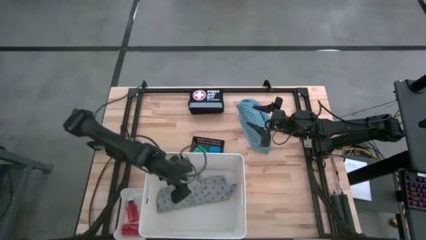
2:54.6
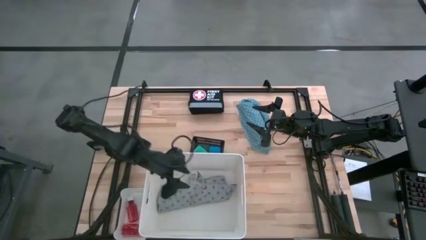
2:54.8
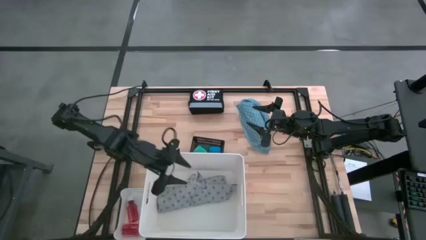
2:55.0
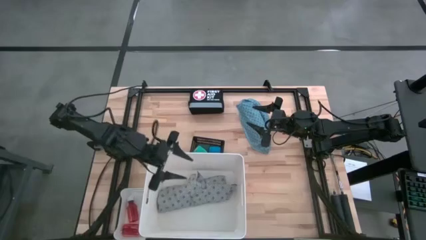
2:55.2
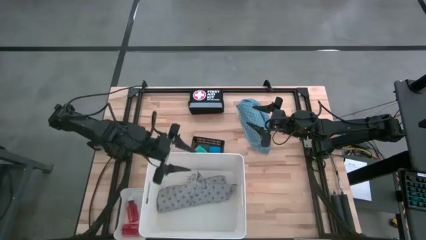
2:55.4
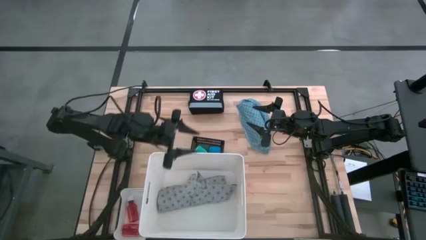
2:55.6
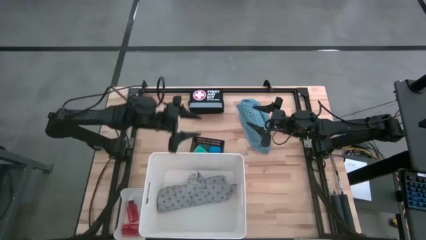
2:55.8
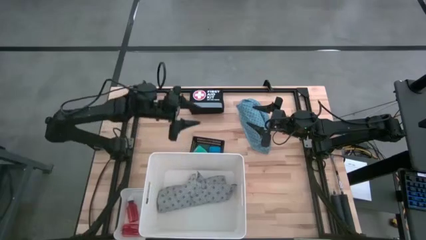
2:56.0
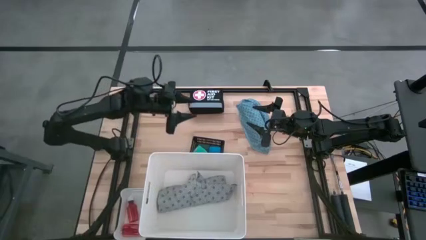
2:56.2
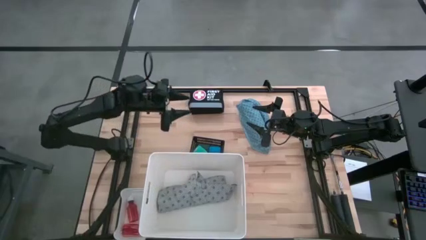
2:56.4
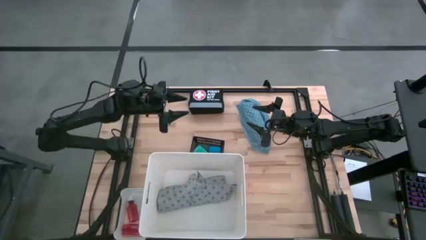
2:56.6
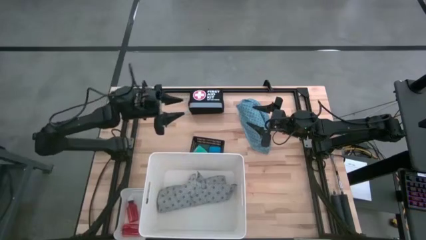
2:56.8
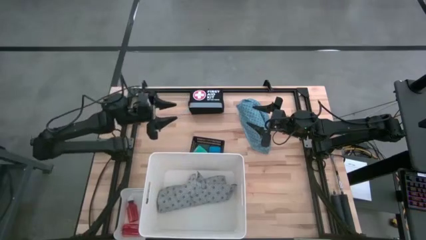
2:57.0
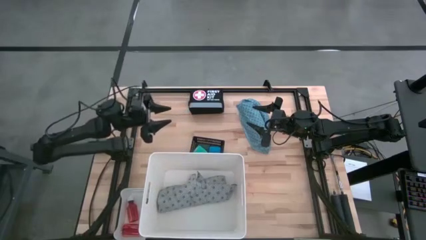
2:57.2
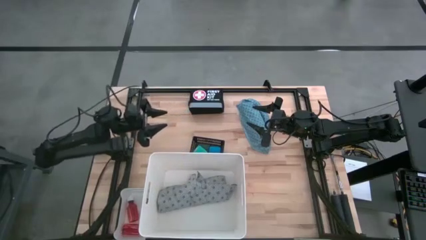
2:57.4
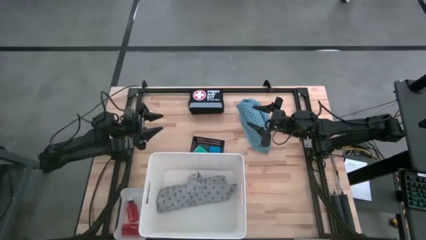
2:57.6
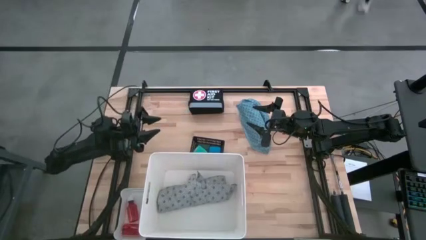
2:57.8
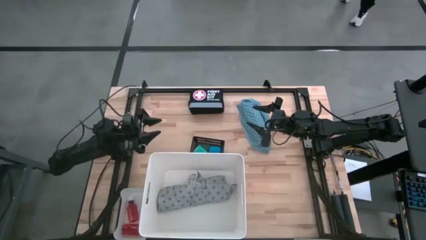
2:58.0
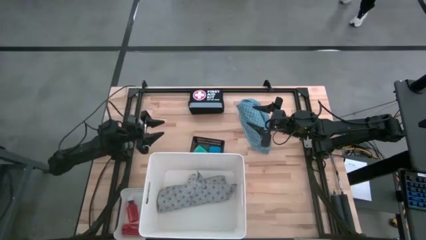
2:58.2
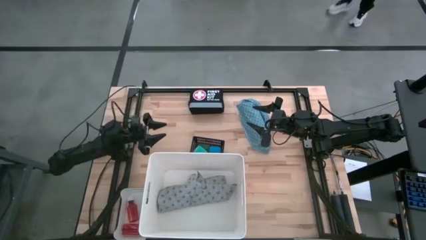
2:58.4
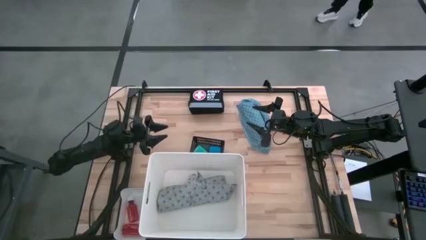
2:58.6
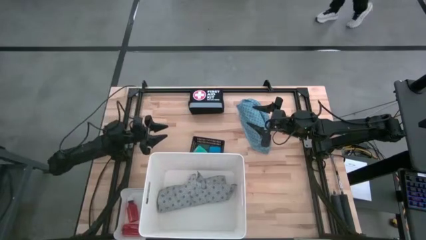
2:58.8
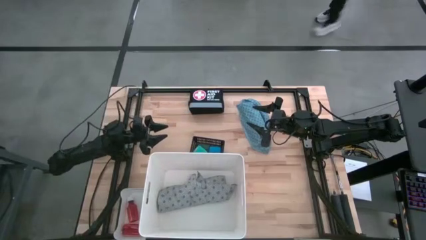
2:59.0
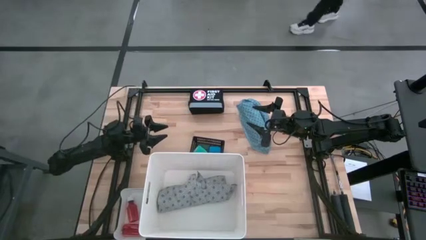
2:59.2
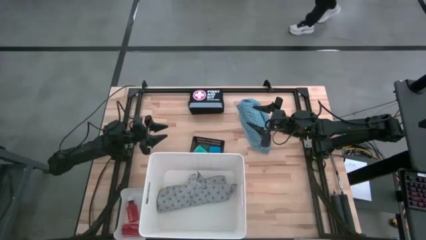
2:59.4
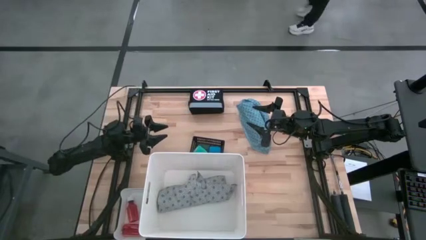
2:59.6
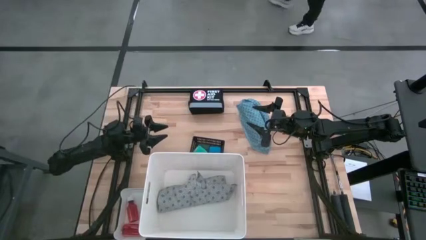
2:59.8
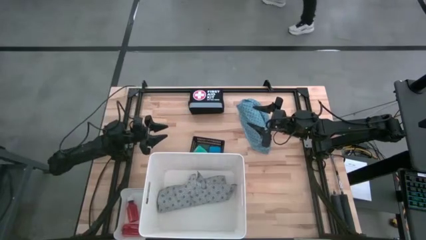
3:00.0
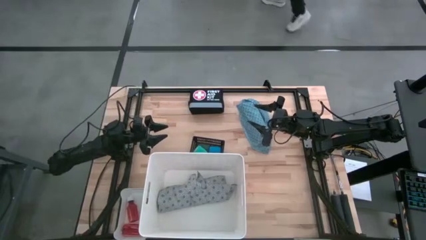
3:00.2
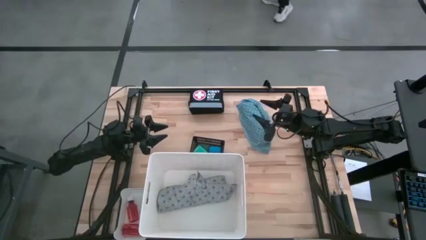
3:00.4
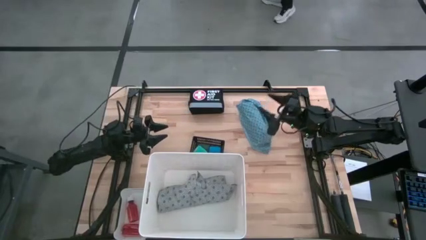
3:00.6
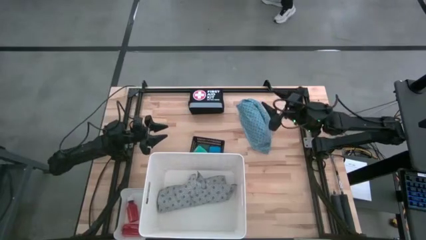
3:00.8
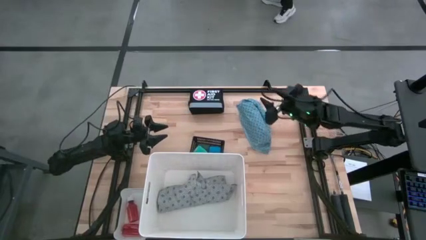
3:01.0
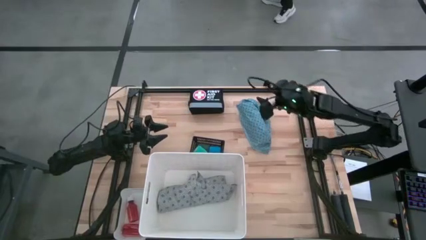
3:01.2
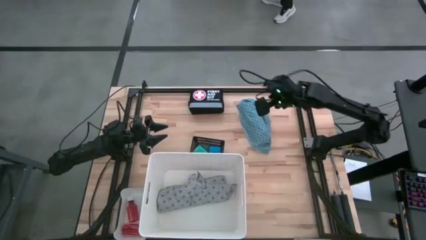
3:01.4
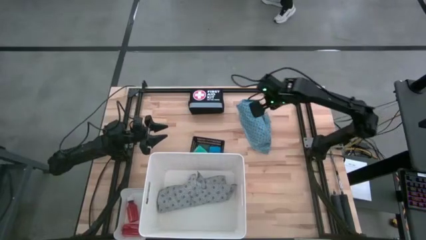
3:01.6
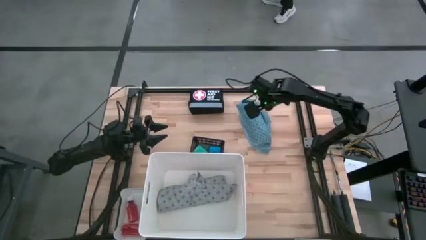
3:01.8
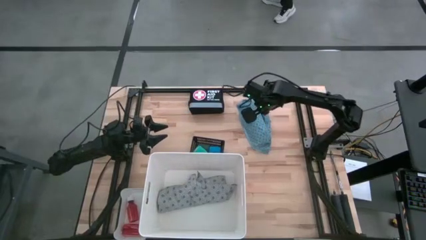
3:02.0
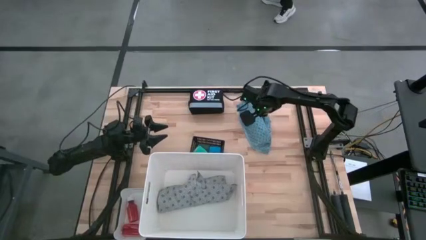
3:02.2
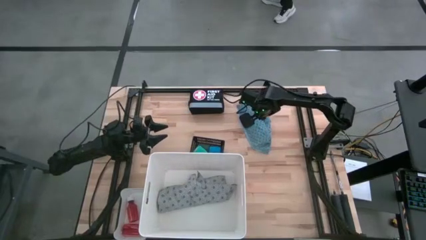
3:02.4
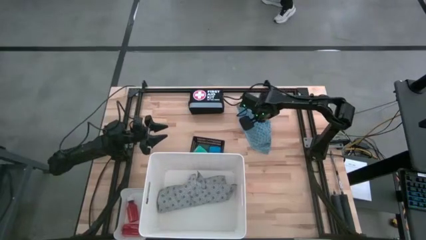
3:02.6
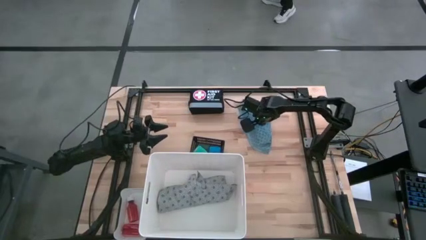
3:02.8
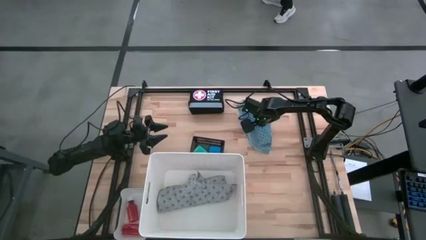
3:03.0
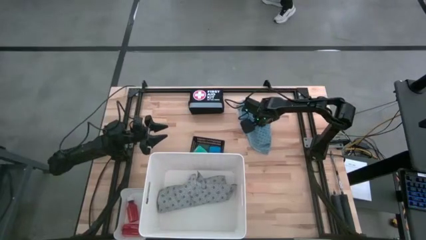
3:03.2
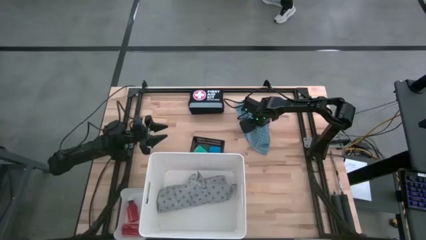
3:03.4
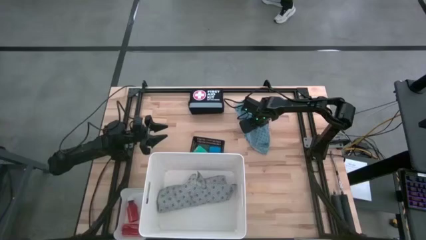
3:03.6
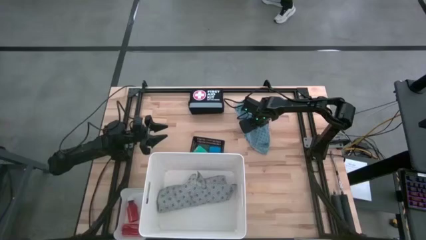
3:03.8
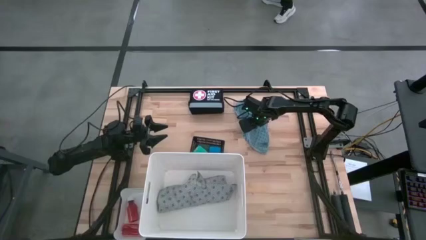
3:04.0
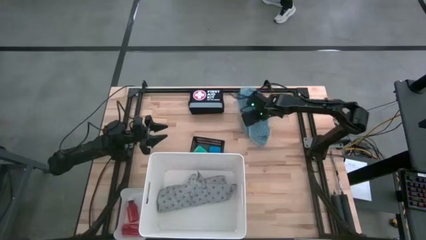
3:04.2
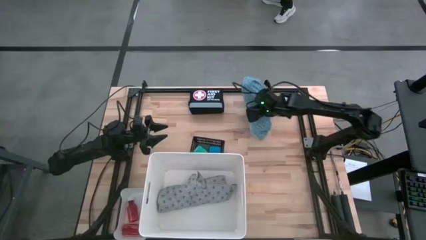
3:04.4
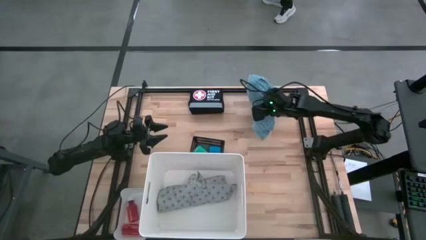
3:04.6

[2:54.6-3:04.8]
Task: Pick & Place Medicine items
Put the blue patient gown into the large white bin

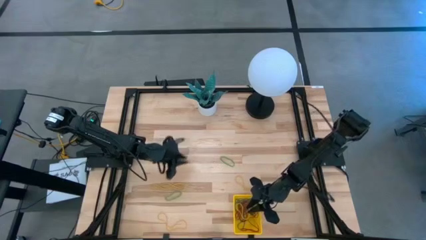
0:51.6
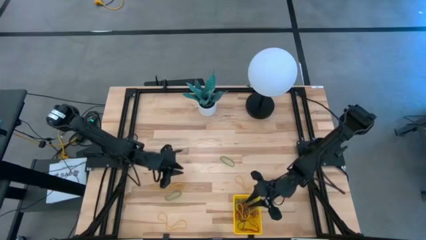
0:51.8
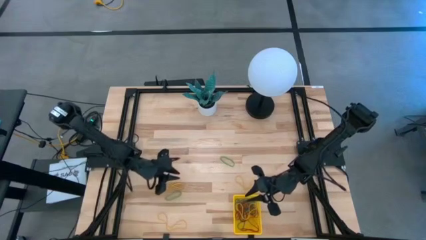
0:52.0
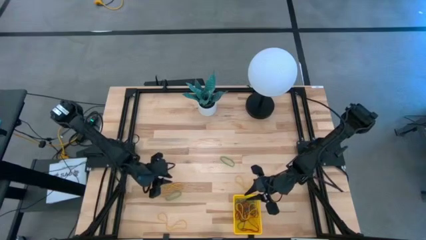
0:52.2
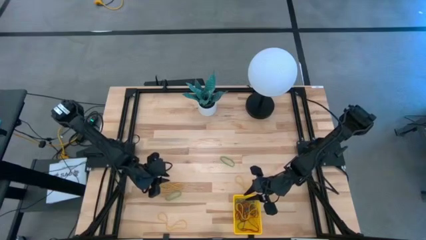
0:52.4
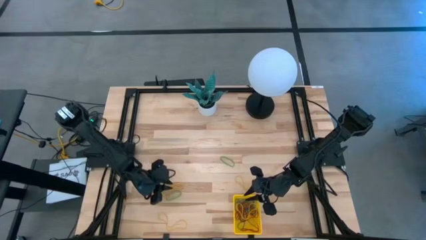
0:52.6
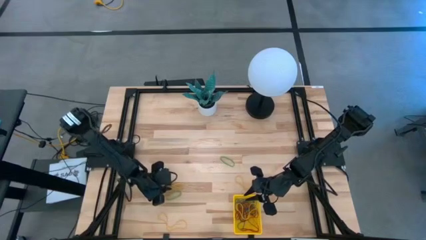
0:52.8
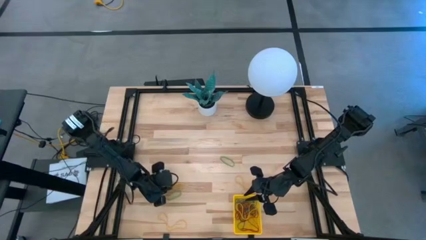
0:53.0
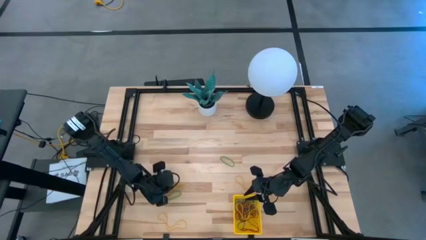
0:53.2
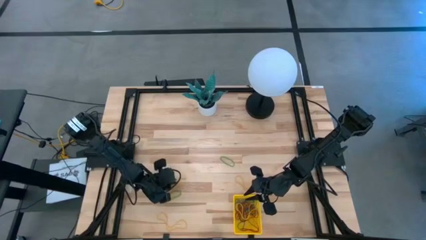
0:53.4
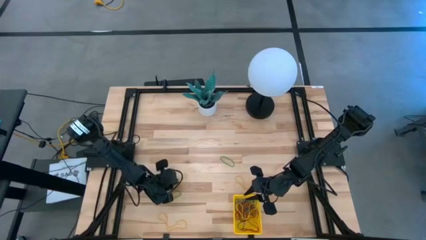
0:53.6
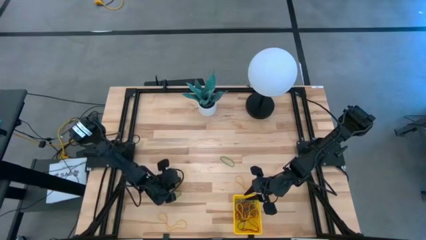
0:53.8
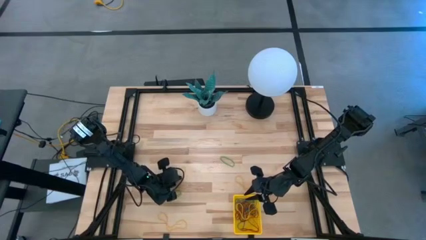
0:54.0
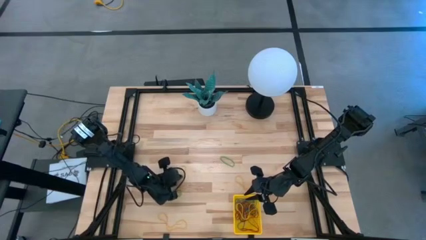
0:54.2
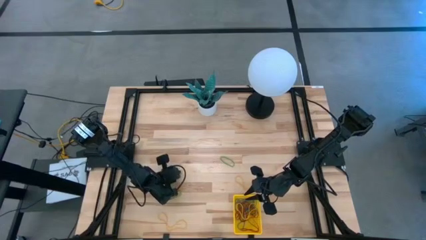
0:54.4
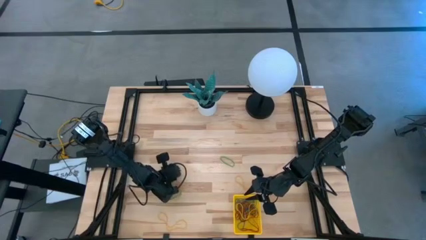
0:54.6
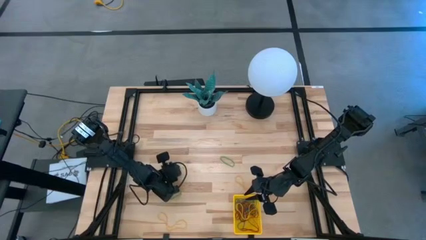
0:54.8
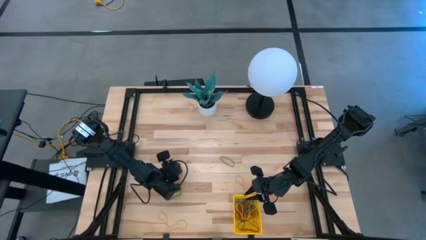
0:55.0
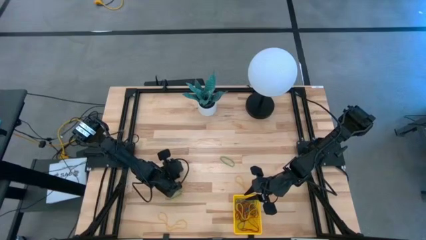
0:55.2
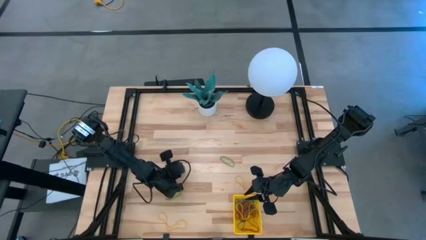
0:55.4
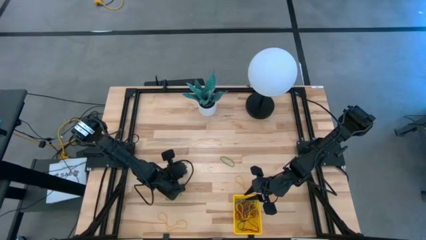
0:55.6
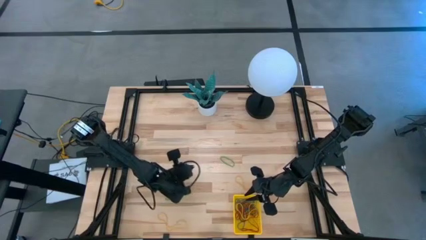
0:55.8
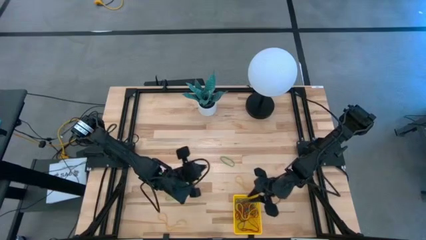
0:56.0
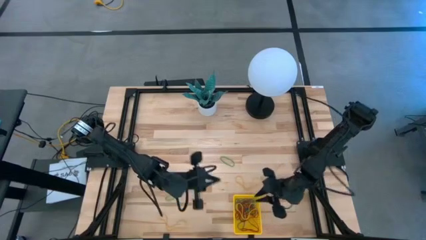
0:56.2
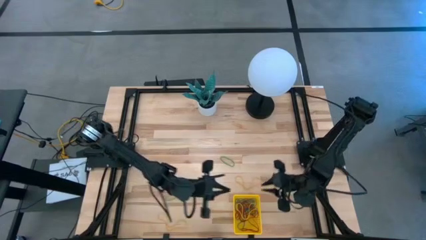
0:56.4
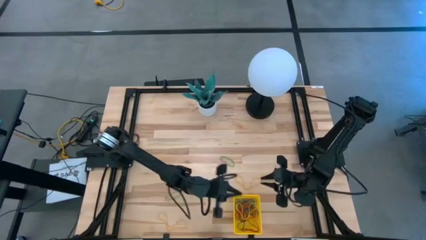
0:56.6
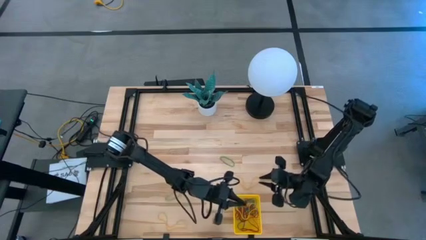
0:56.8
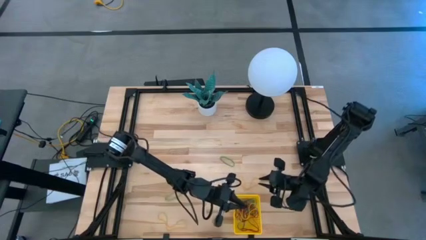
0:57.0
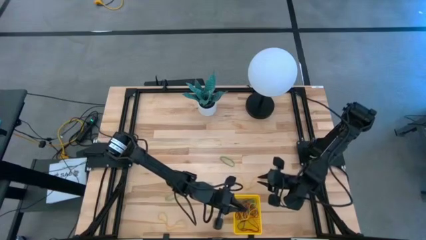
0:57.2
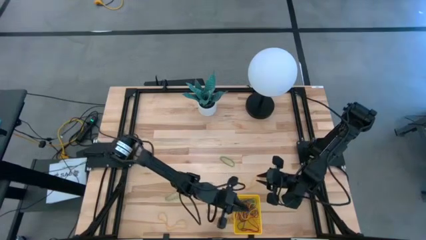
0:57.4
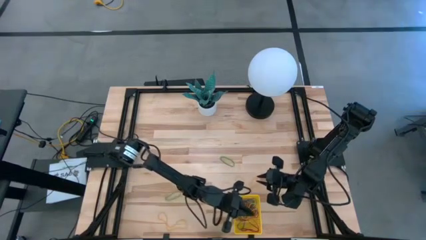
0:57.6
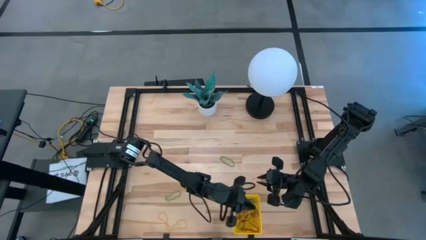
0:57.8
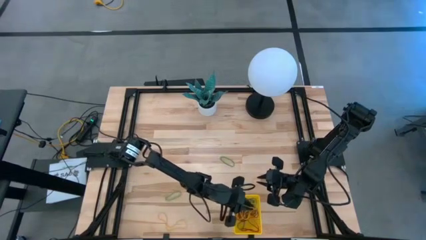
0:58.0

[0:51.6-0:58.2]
Task: Pick and place rubber bands into bin
Put the yellow rubber band into the yellow basket
